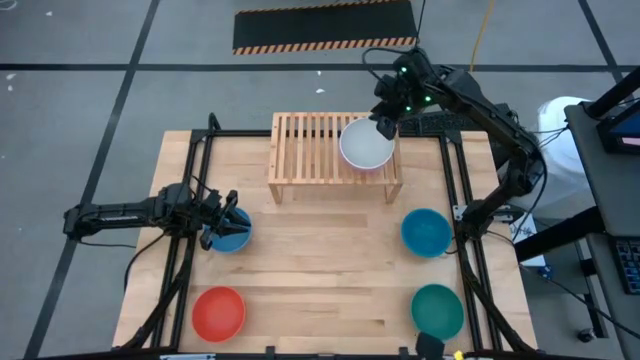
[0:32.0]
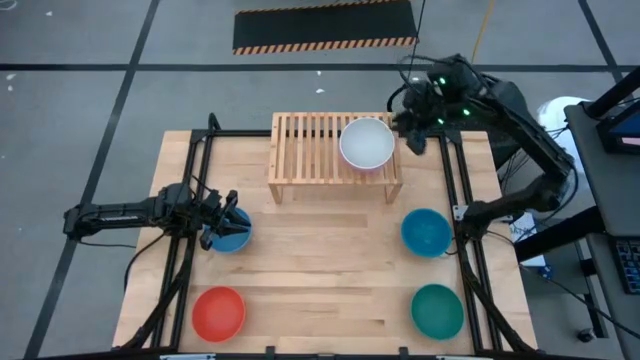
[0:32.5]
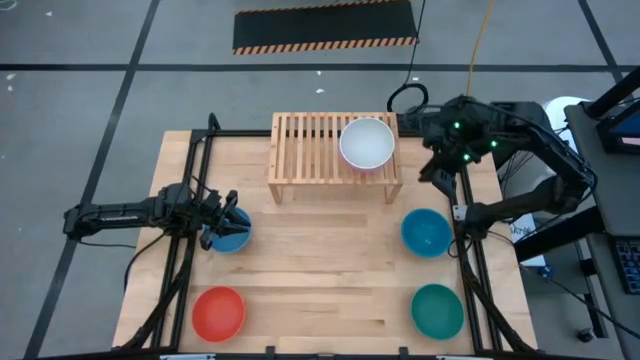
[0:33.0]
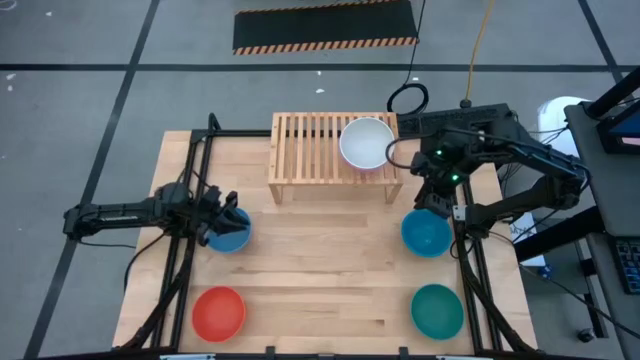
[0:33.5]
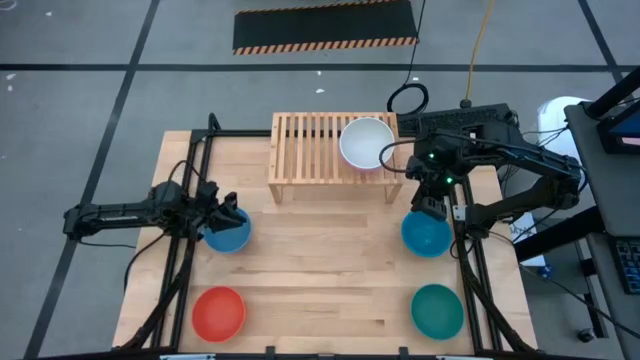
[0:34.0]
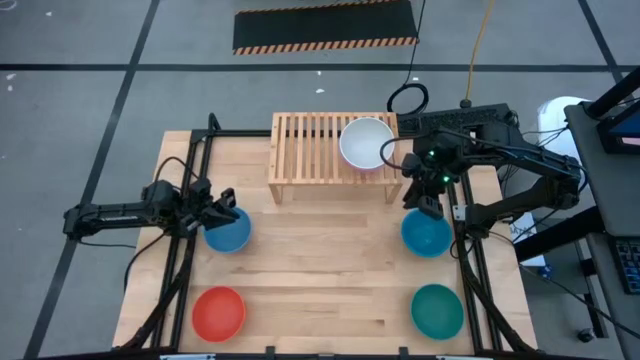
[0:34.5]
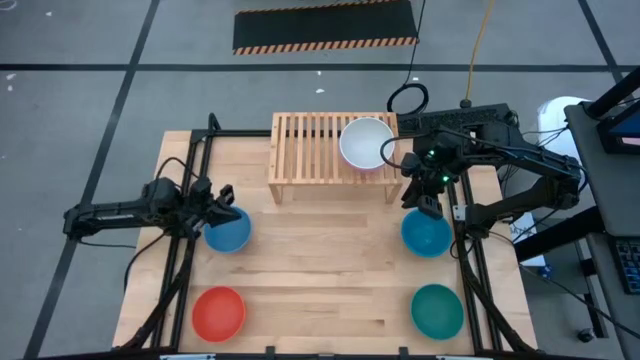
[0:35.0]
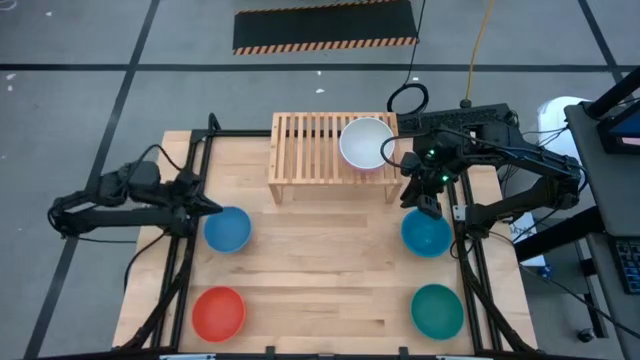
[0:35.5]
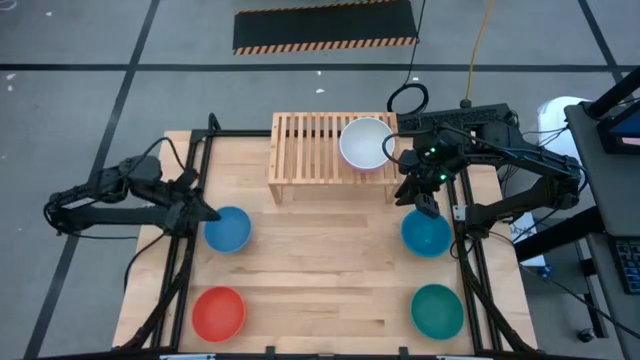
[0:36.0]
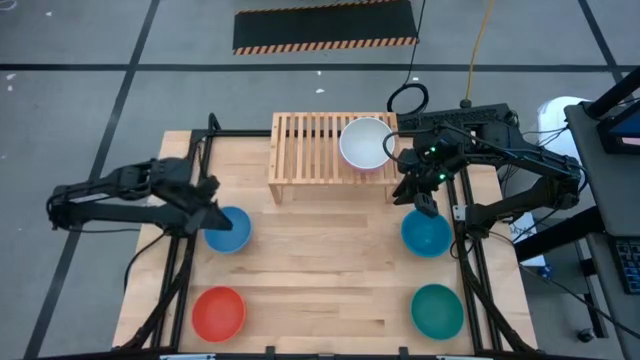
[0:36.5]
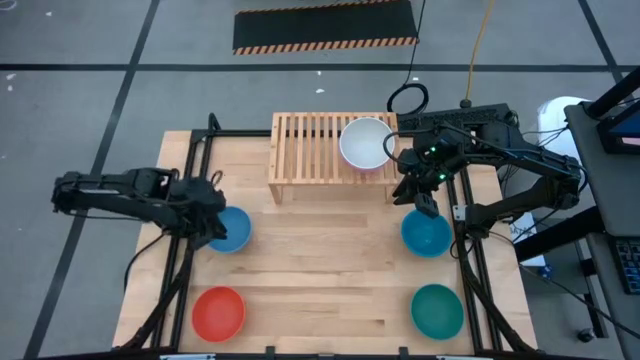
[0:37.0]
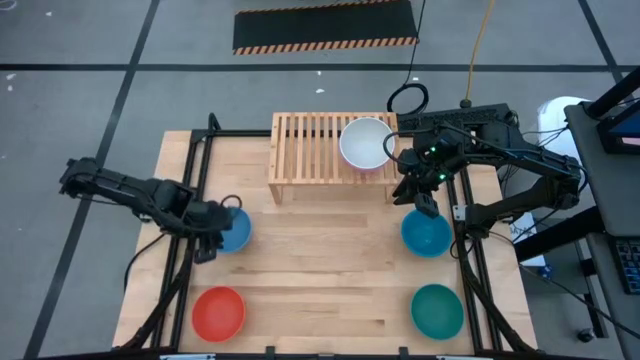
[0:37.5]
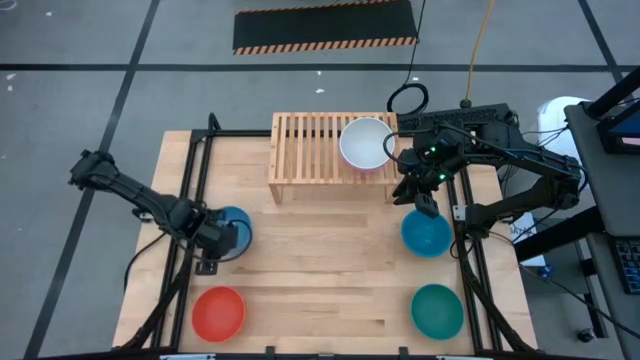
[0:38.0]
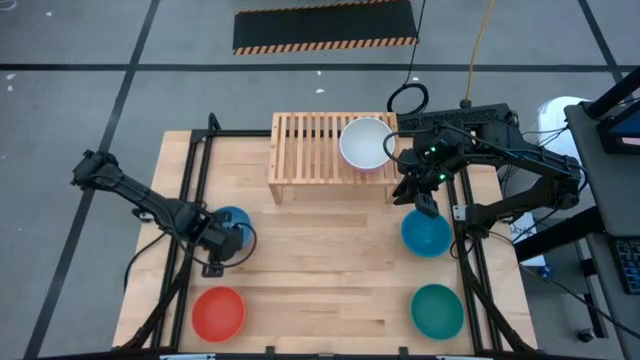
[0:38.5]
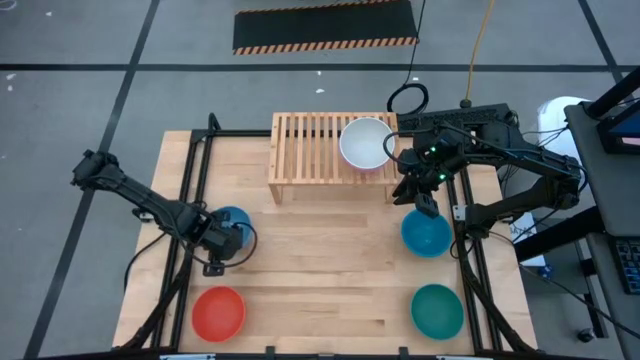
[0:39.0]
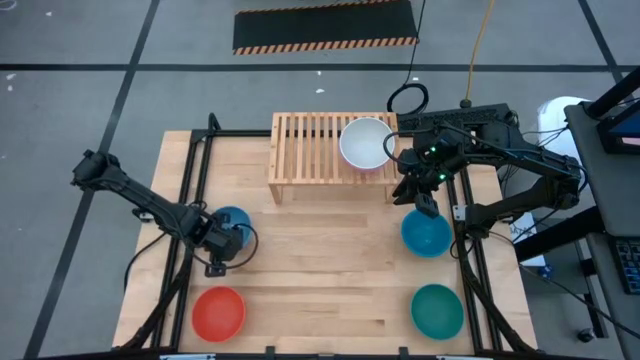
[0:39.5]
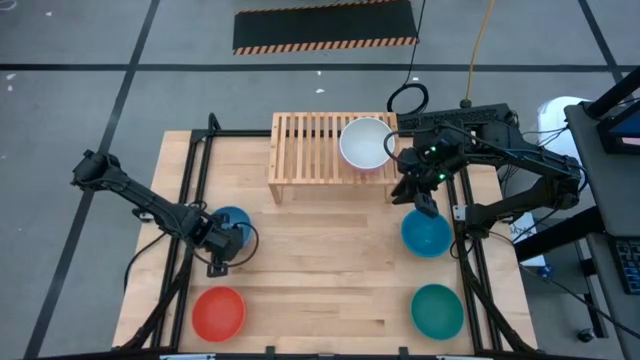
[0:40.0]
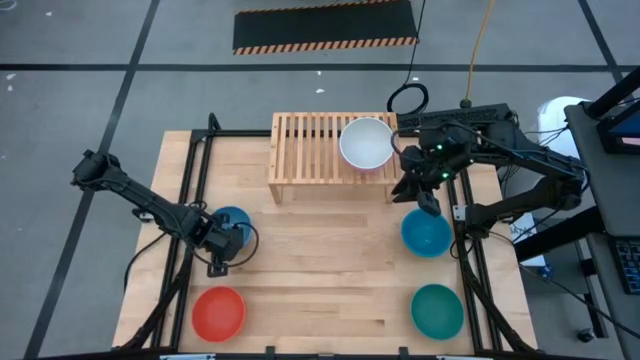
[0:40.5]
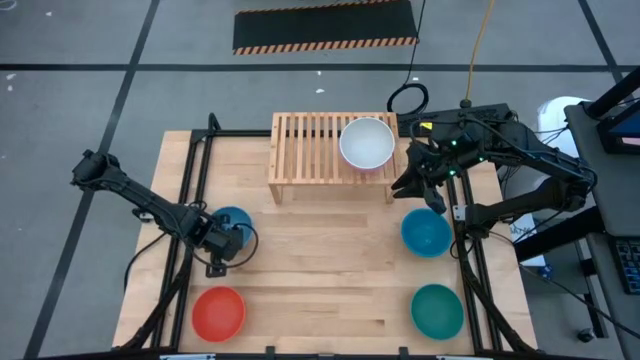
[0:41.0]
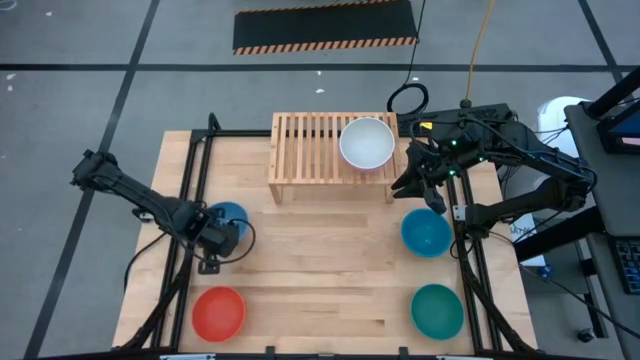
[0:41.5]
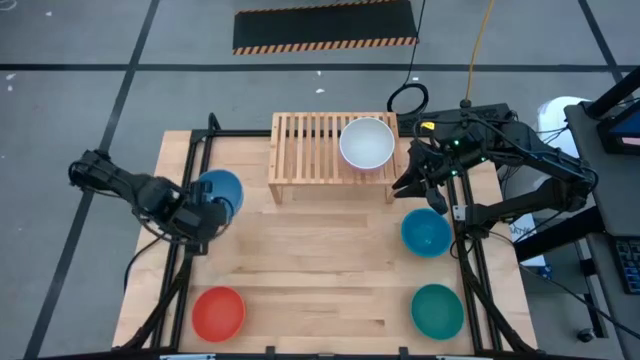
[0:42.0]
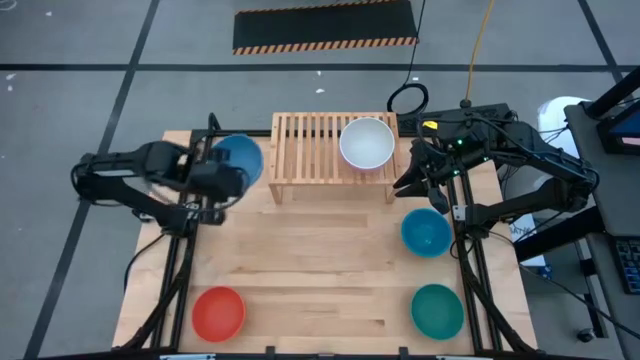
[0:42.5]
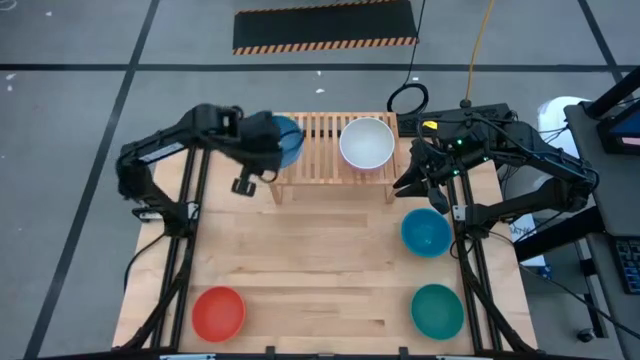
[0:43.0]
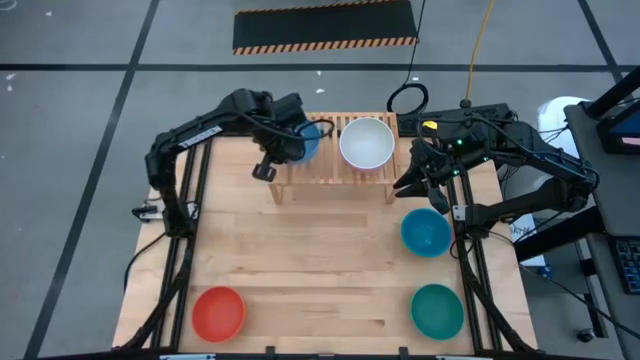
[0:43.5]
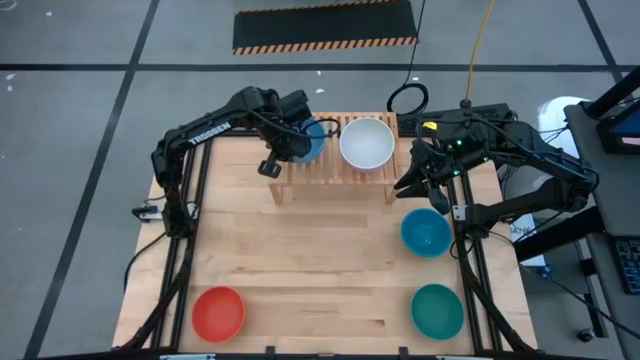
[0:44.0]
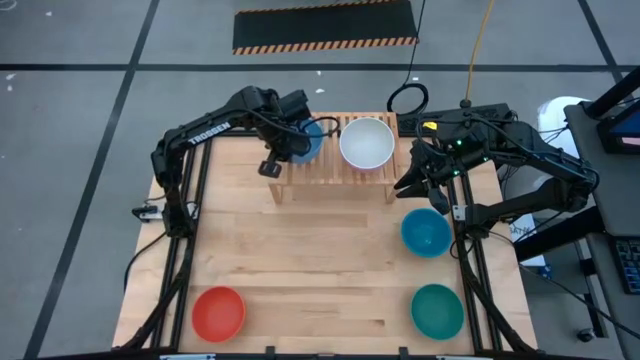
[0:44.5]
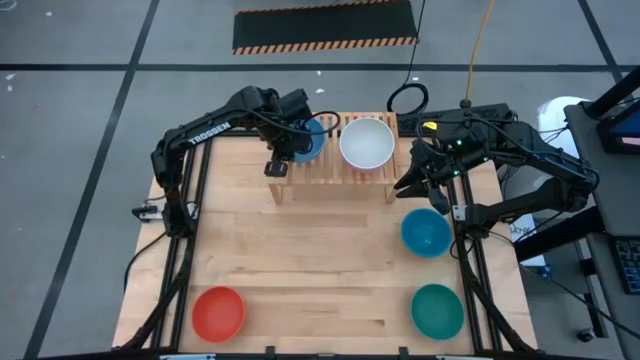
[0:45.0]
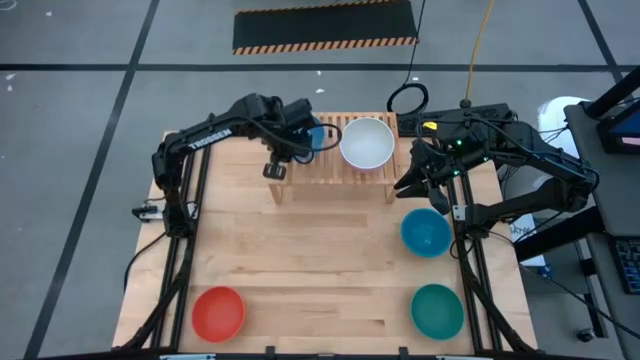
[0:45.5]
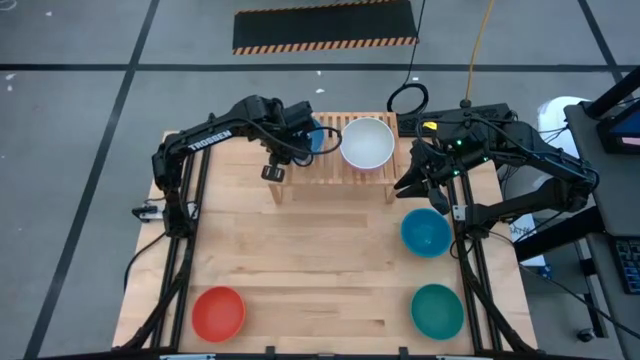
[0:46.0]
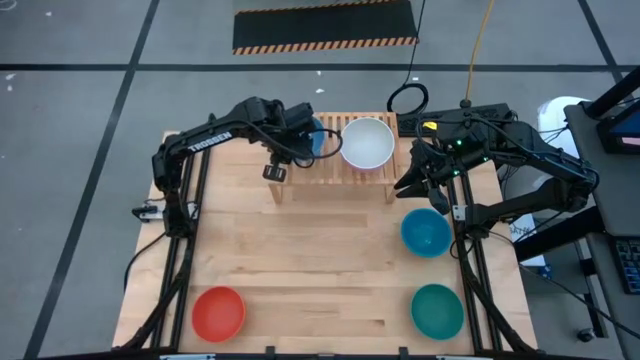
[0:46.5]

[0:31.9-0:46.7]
Task: Place and stack bowls onto a shelf
Put the light blue bowl on the shelf
